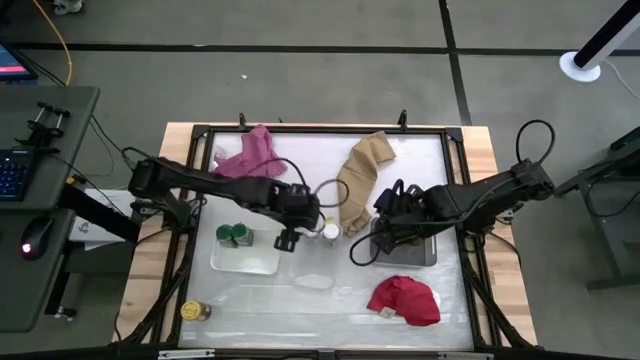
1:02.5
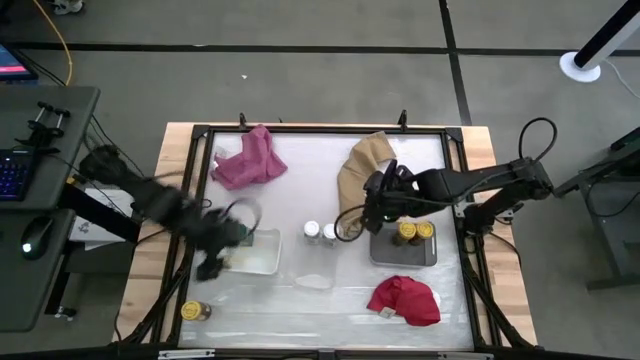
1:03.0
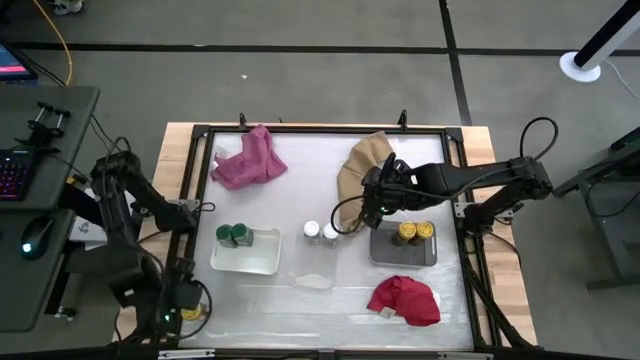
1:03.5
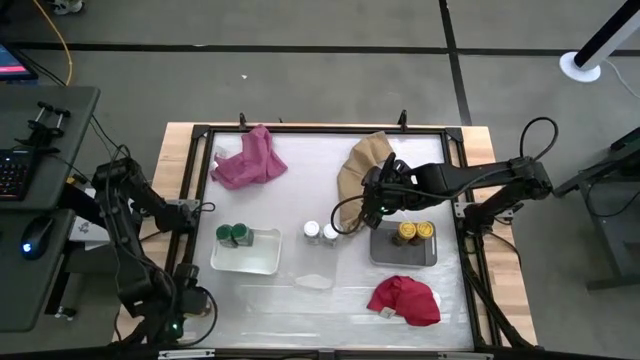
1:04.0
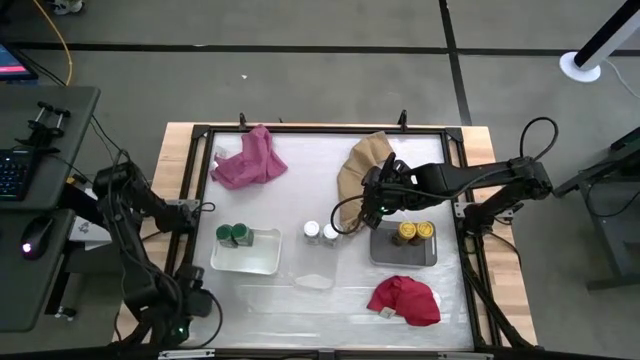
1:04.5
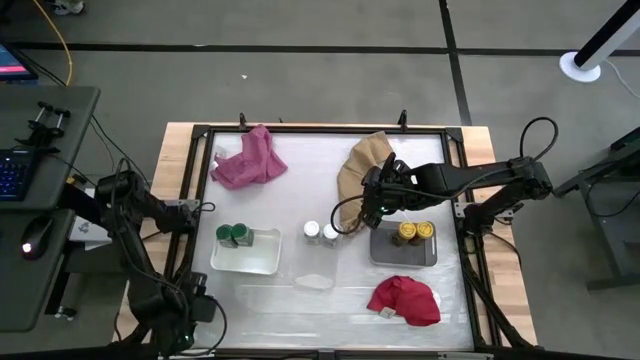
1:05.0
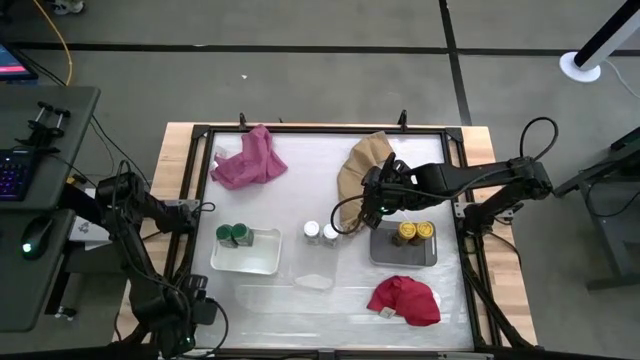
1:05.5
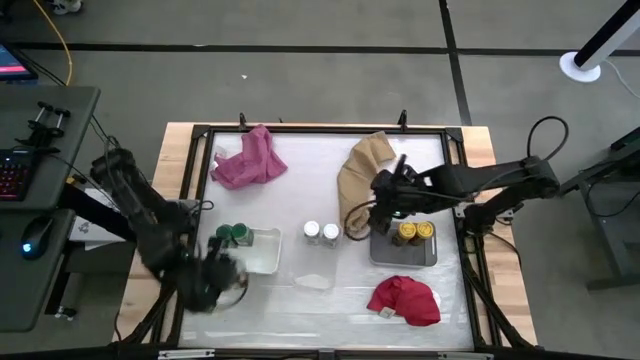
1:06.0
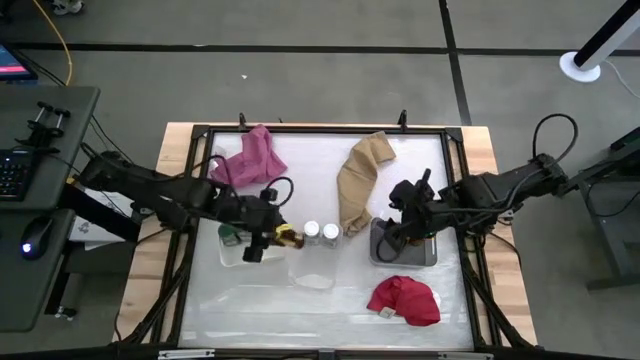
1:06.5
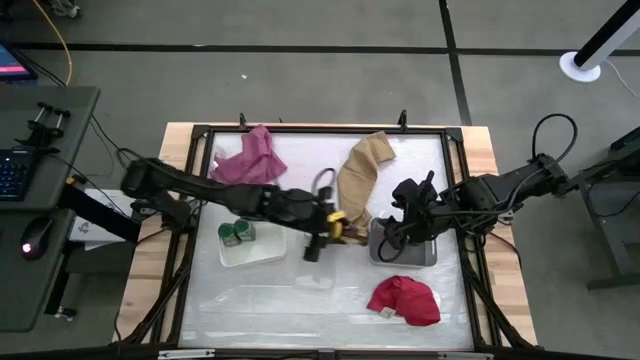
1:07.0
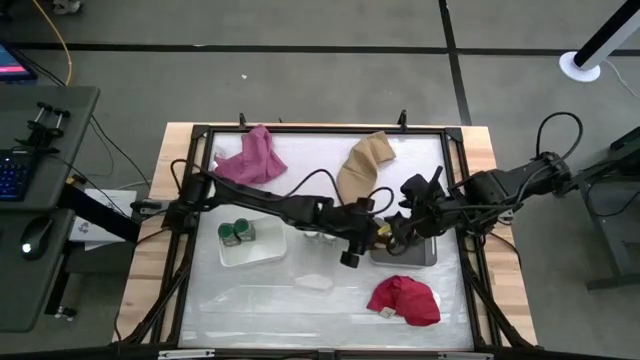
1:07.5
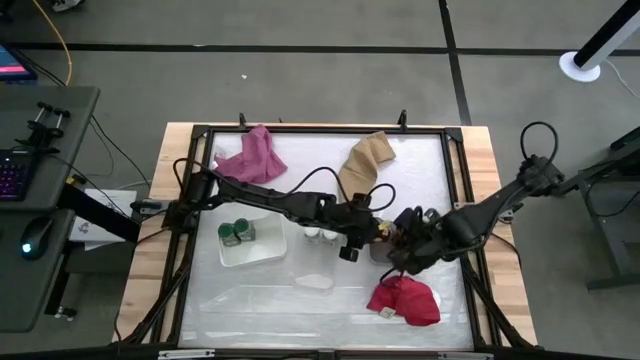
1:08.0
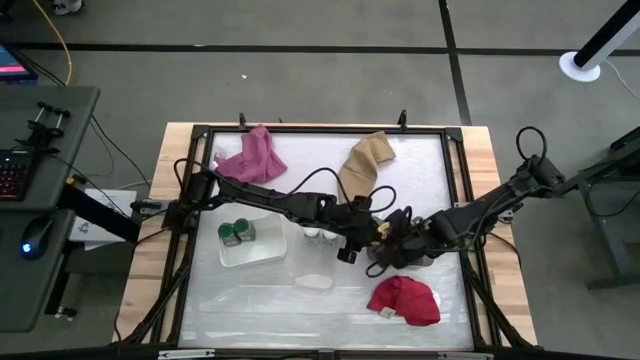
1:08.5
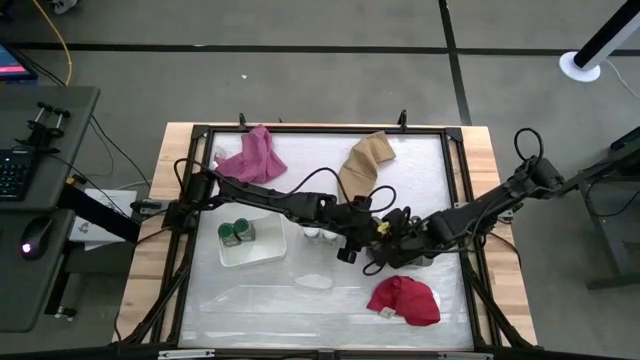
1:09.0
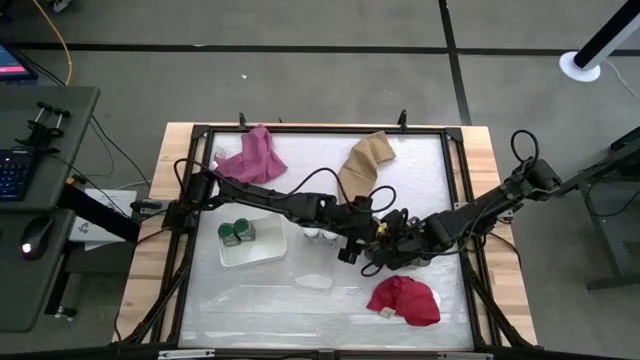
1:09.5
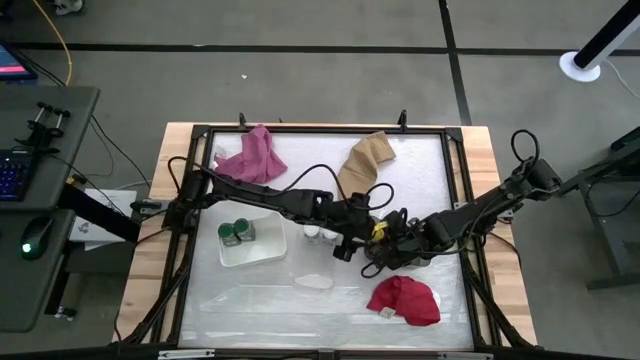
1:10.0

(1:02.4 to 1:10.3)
Task: Sort spices by type
Put the yellow seasoning bottle into the black bin

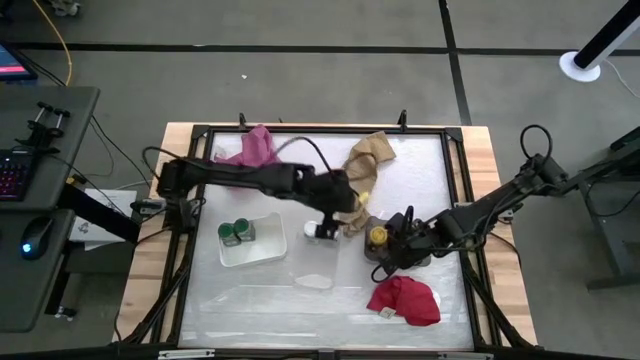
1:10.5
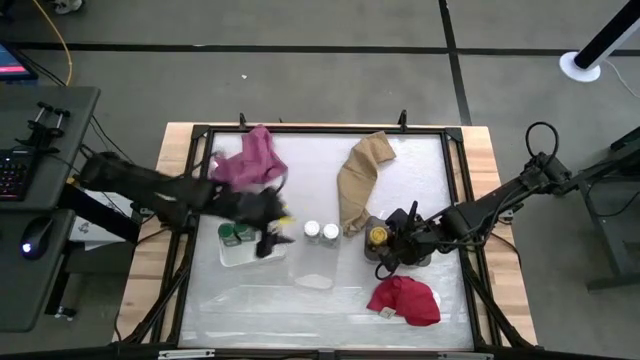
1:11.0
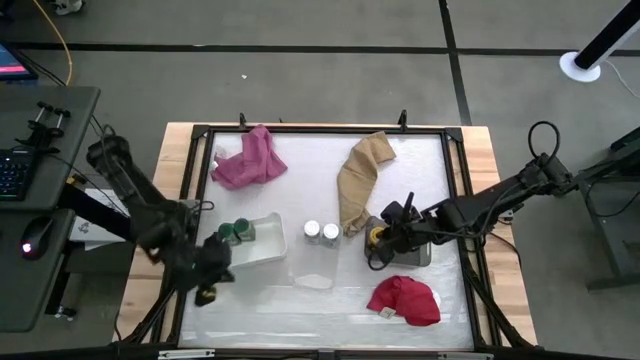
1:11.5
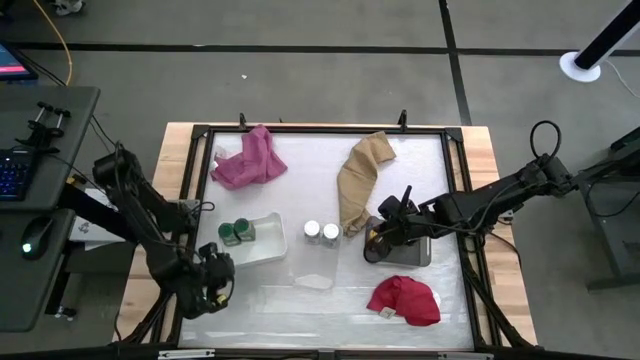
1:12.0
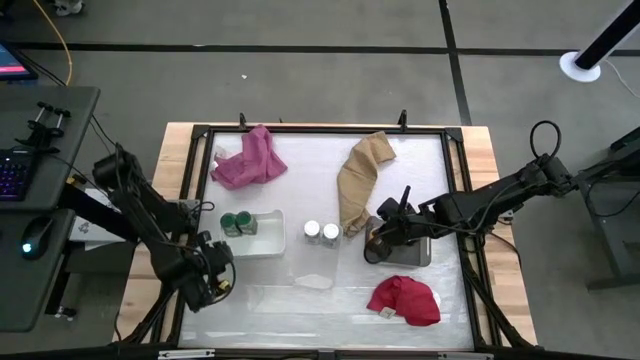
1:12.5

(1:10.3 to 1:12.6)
Adjust the white bin

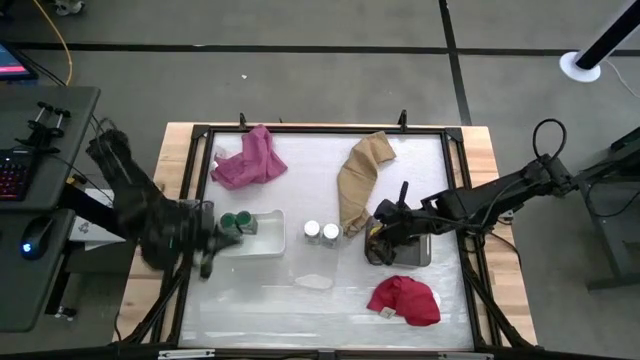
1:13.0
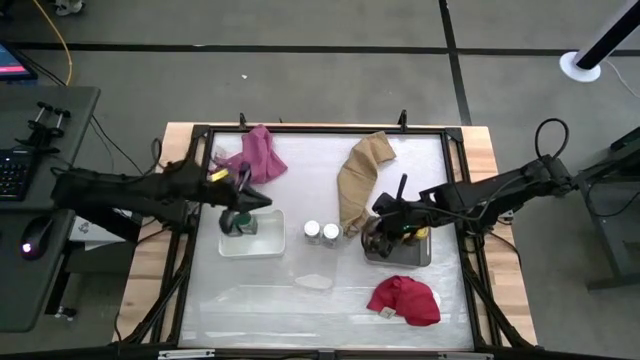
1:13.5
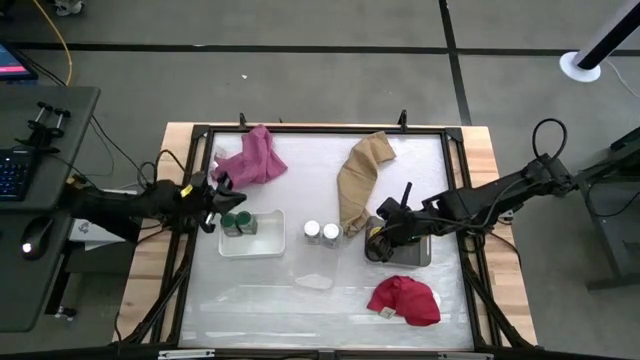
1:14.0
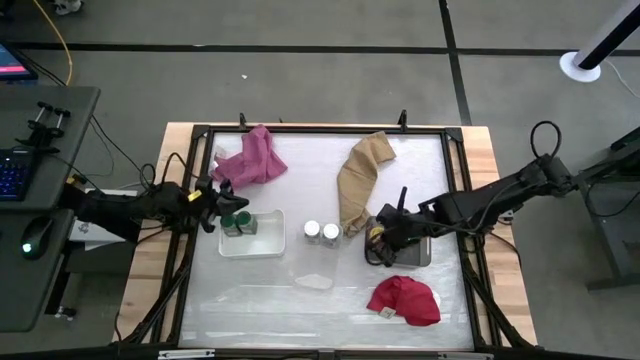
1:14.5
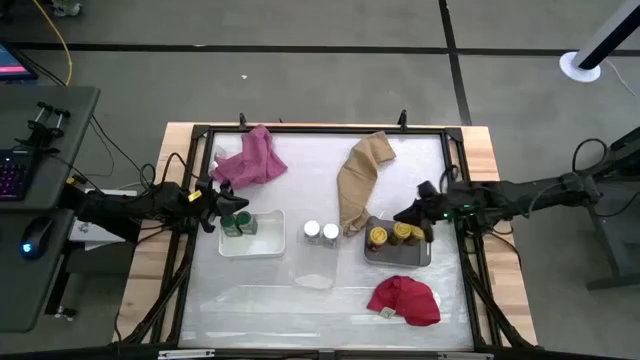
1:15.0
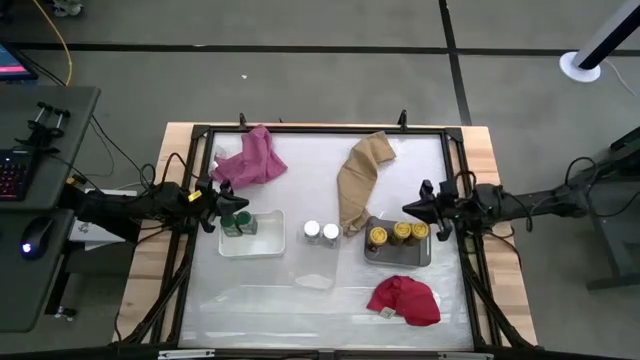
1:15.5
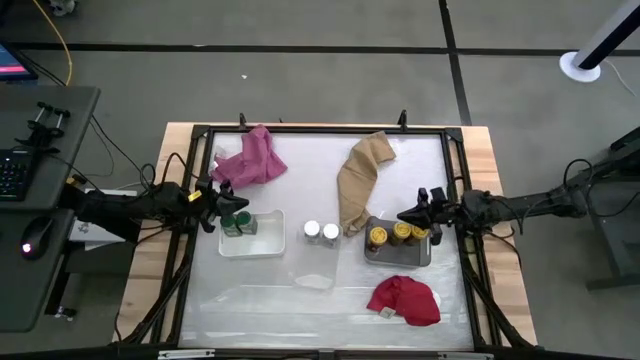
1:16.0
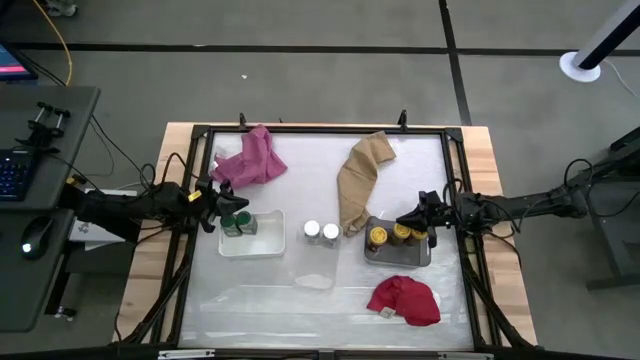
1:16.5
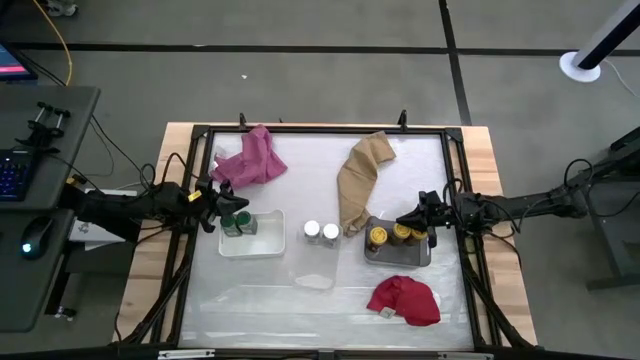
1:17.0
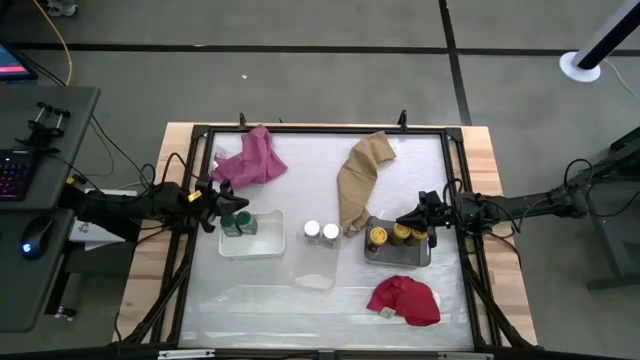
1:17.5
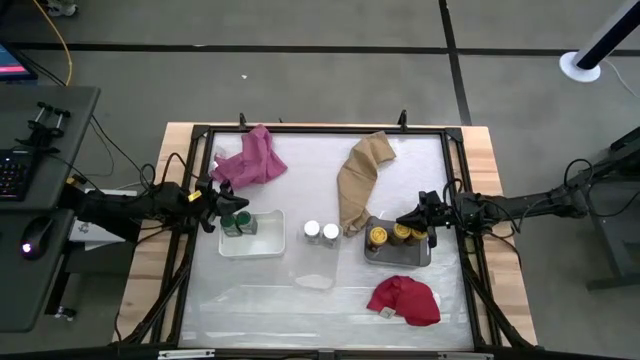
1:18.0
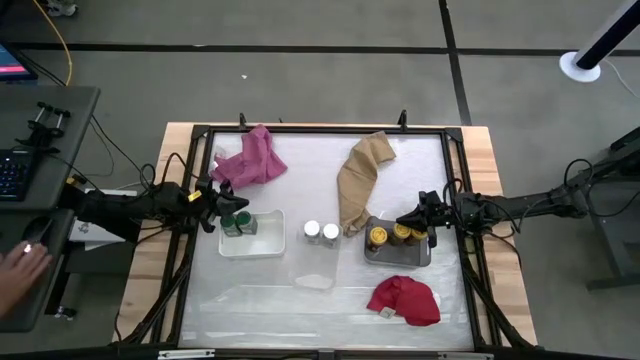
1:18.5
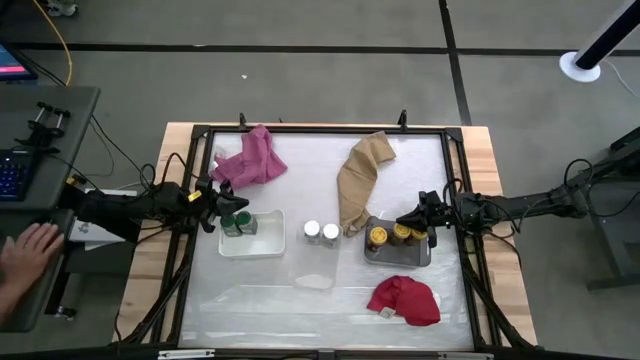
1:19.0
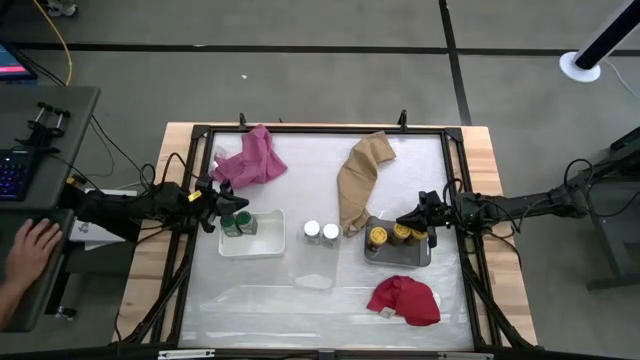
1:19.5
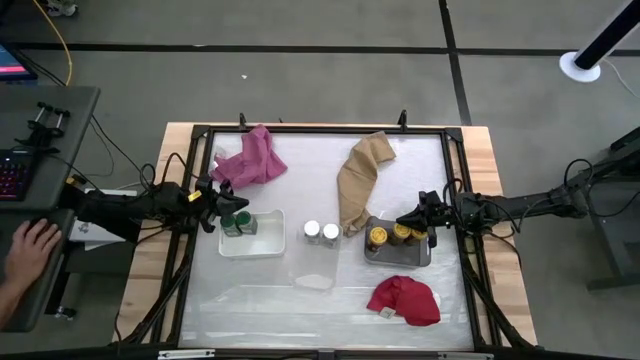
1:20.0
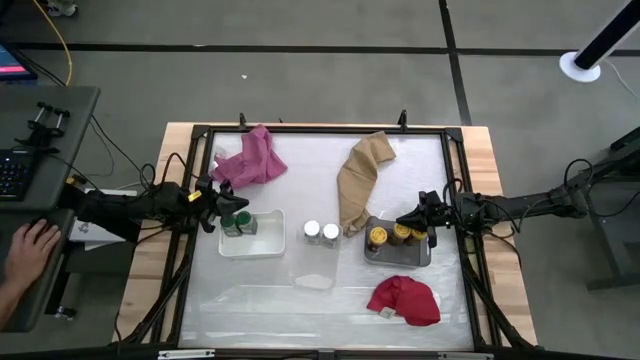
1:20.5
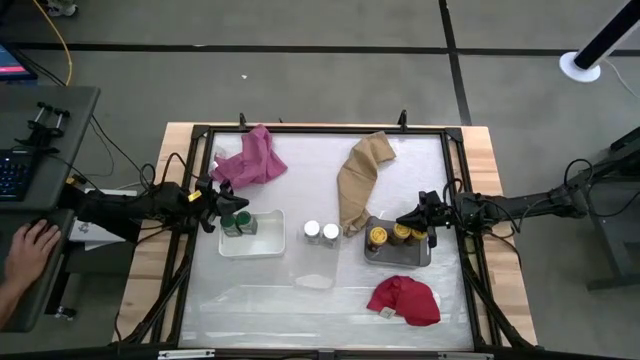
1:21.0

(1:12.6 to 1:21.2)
Return to Home Position

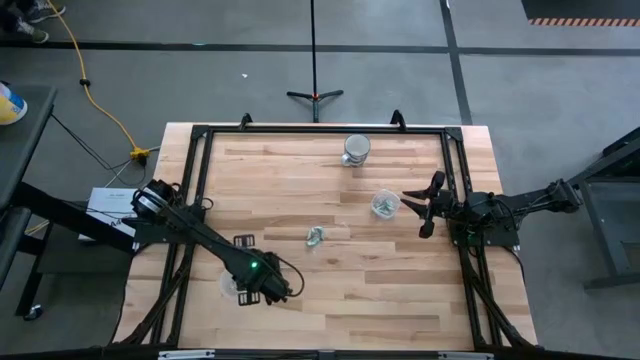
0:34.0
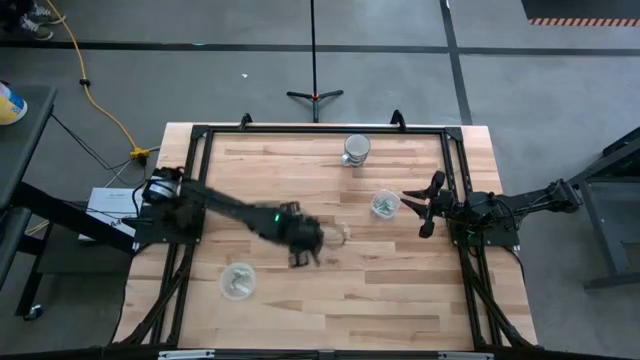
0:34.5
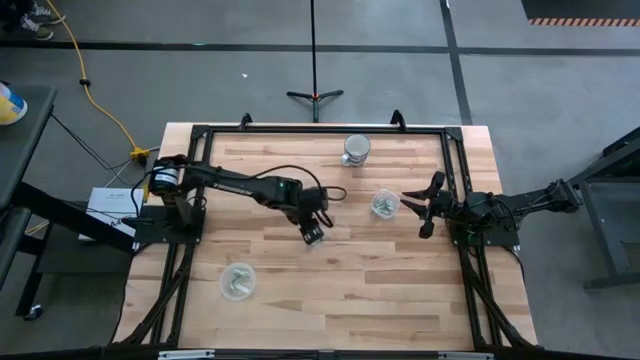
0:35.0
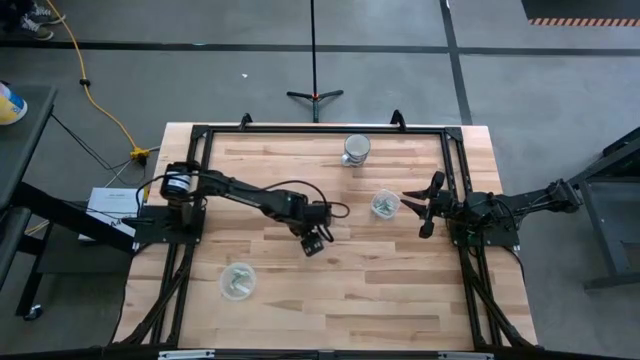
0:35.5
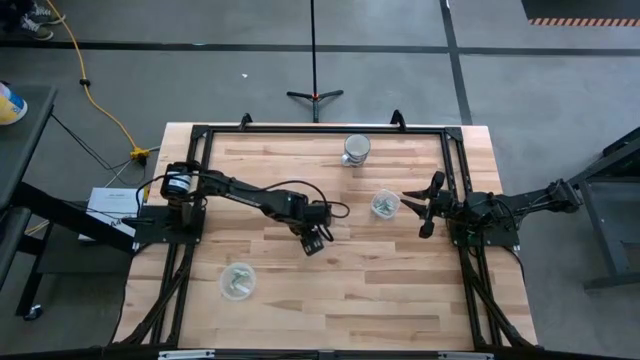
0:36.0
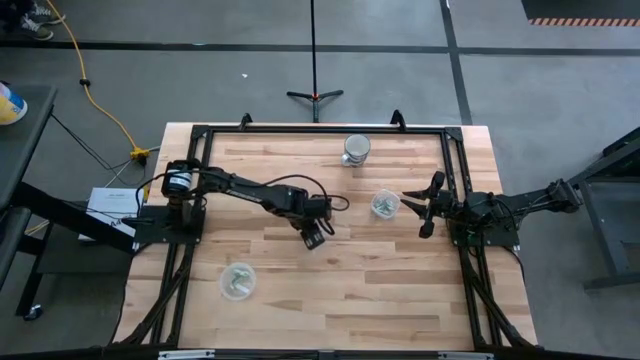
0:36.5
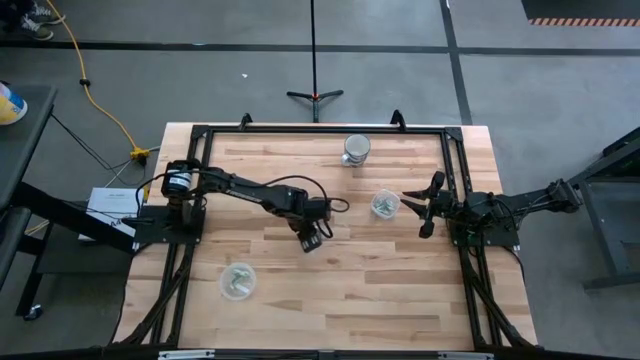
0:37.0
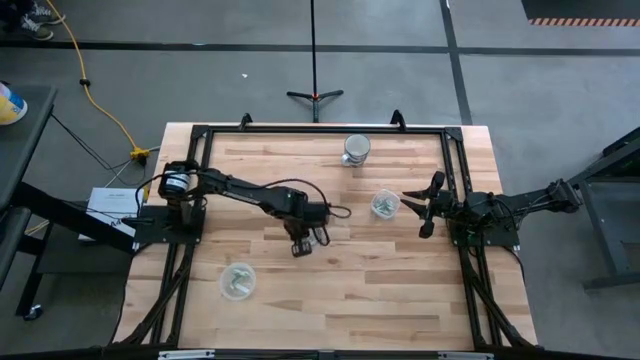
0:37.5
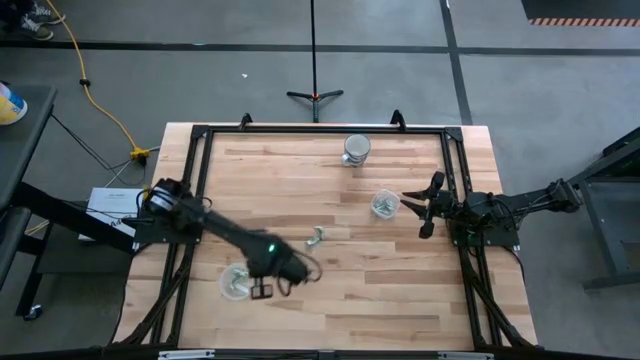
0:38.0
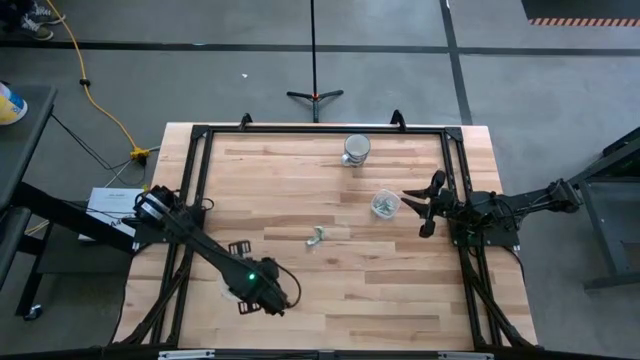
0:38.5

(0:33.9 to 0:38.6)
Task: Pick and place Stevia / Truvia into bins
Put the stevia packet into the round transparent container
